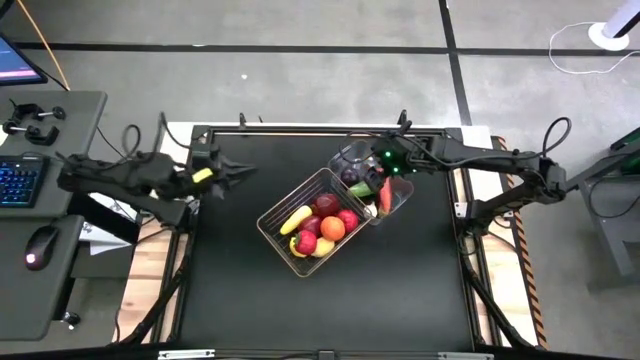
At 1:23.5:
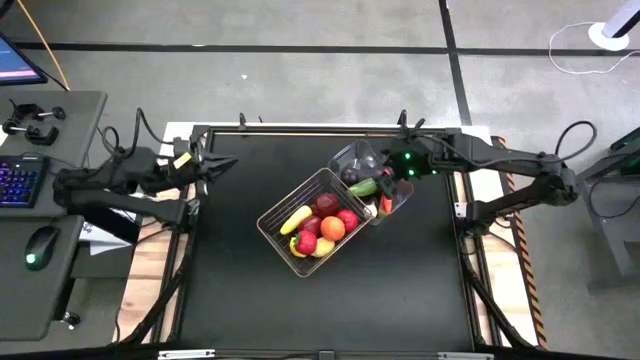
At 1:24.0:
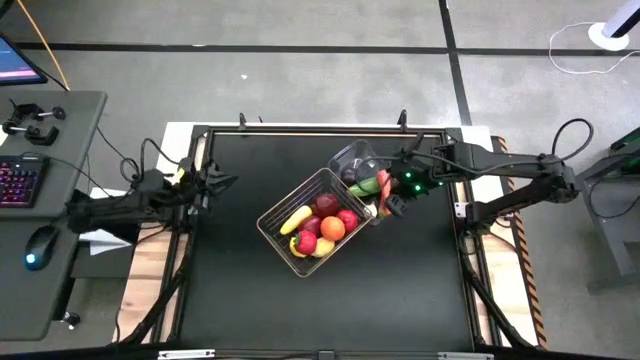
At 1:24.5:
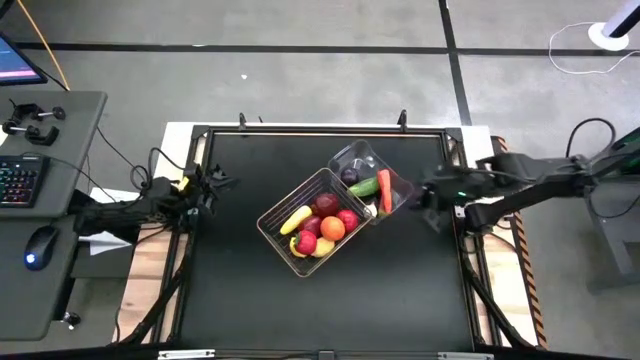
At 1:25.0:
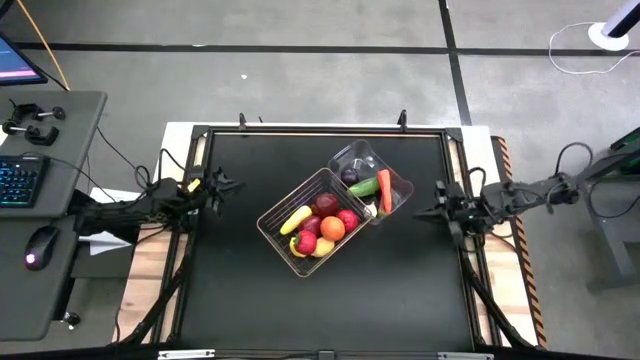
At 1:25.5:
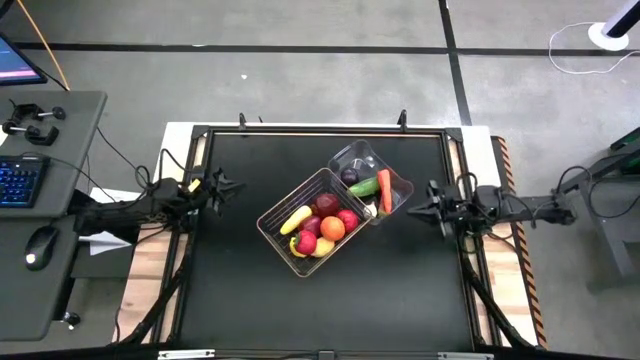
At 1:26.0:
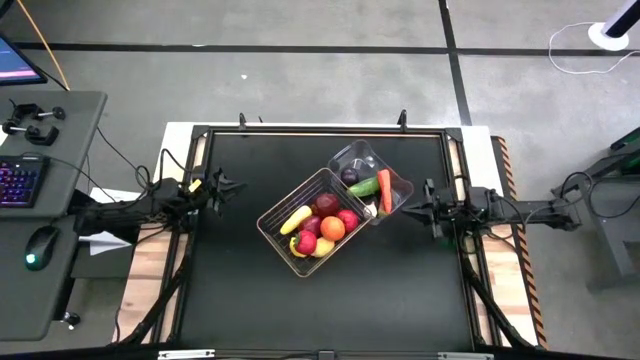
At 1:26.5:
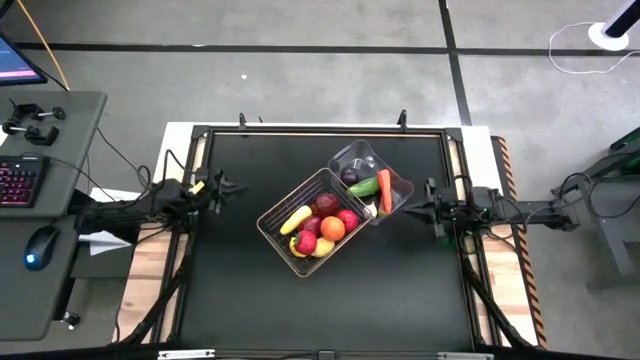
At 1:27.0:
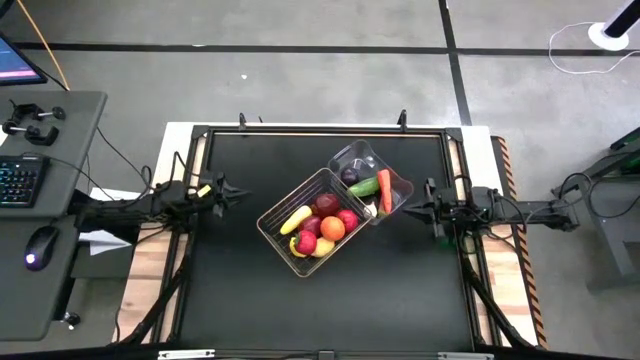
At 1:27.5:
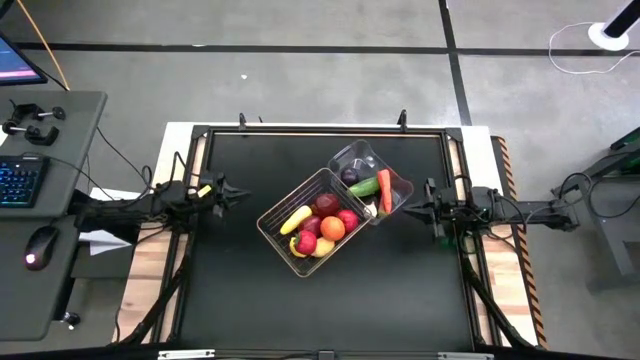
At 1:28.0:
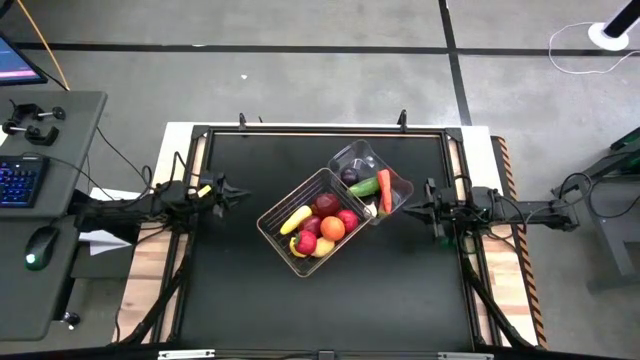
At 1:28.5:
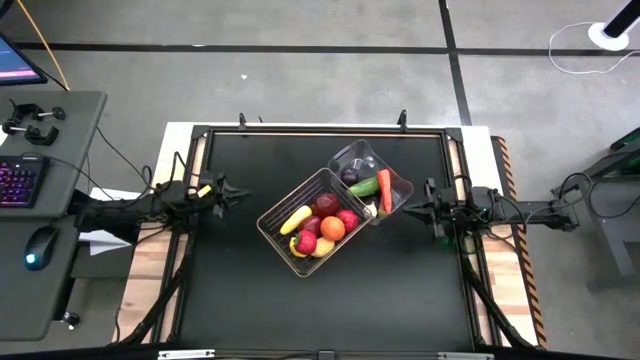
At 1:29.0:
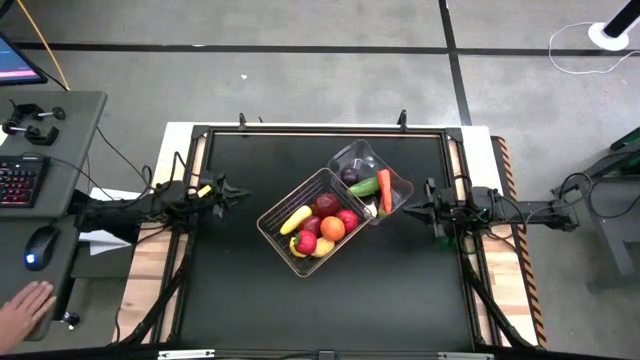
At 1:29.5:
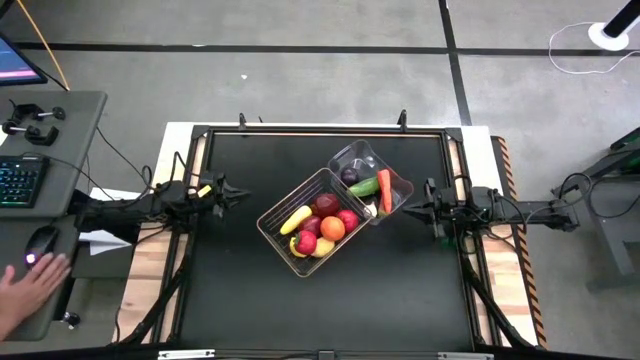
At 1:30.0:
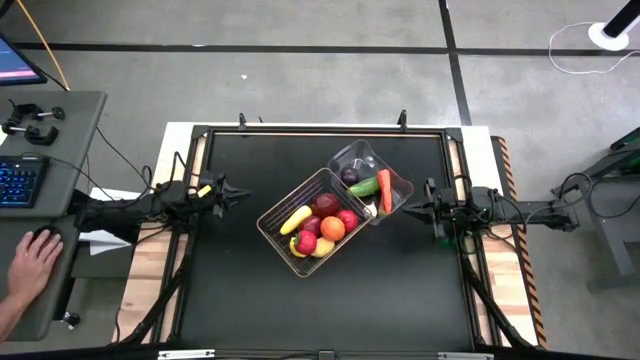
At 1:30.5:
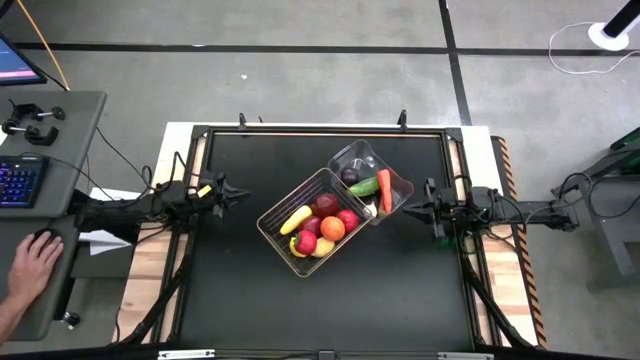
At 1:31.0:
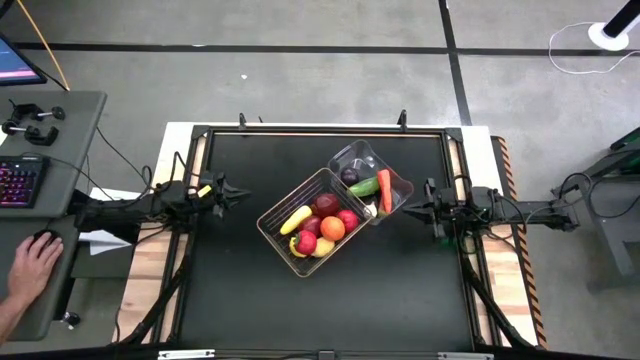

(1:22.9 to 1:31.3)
Task: Sort produce into baskets
Return to Home Position

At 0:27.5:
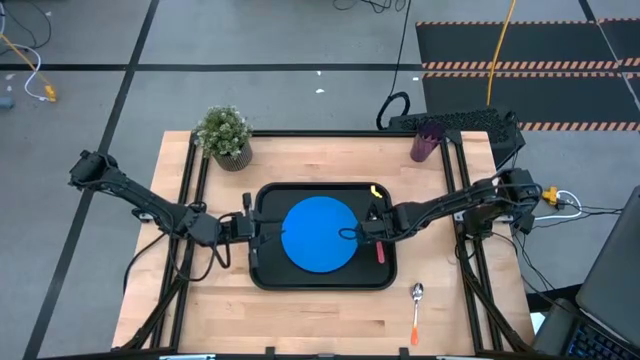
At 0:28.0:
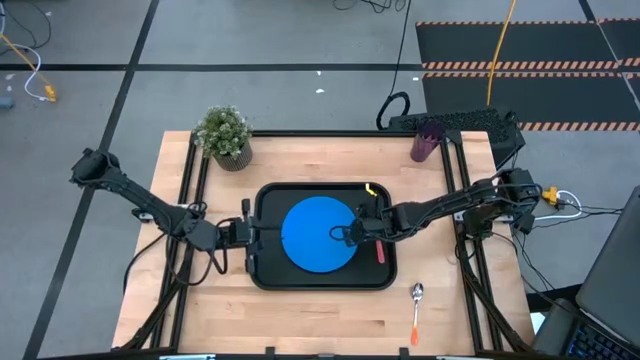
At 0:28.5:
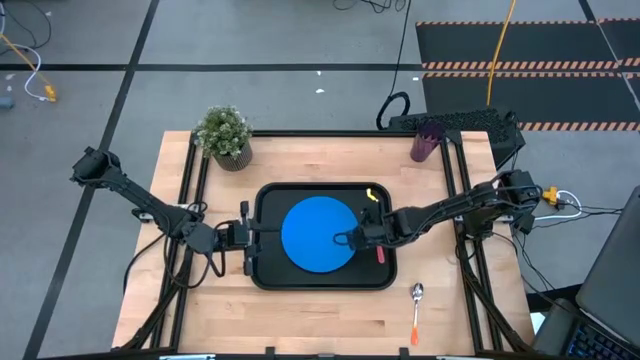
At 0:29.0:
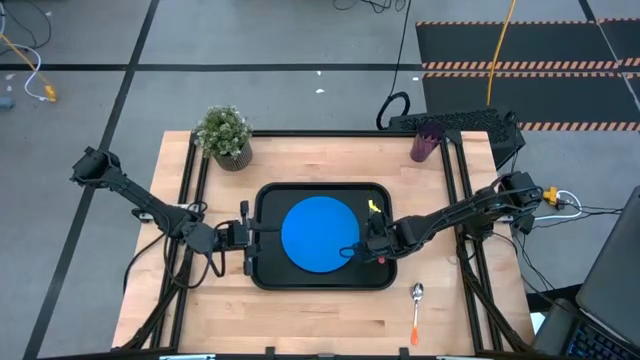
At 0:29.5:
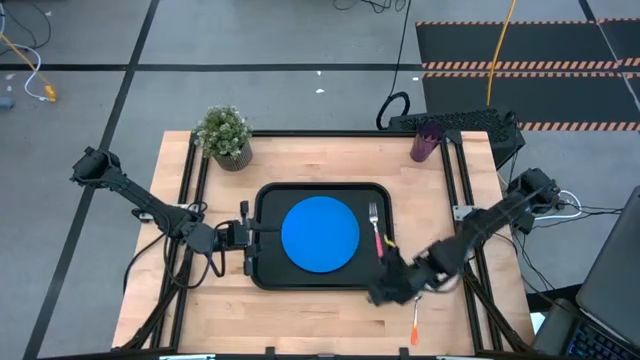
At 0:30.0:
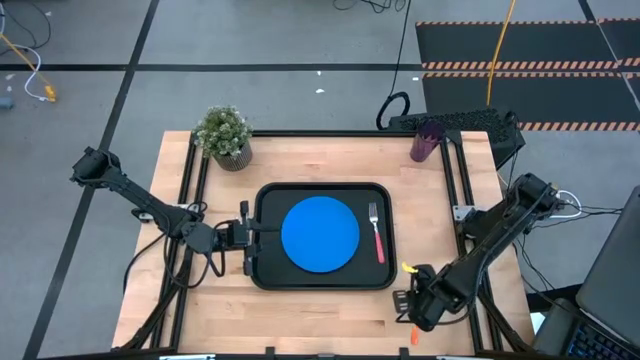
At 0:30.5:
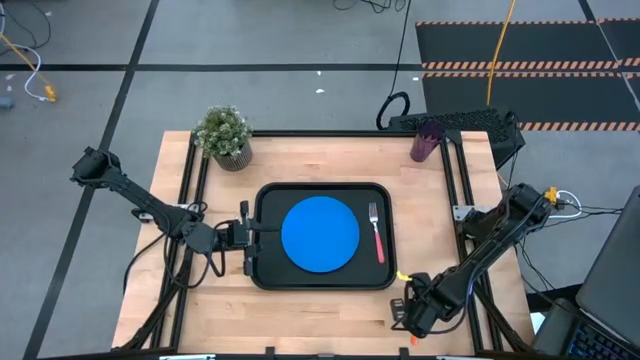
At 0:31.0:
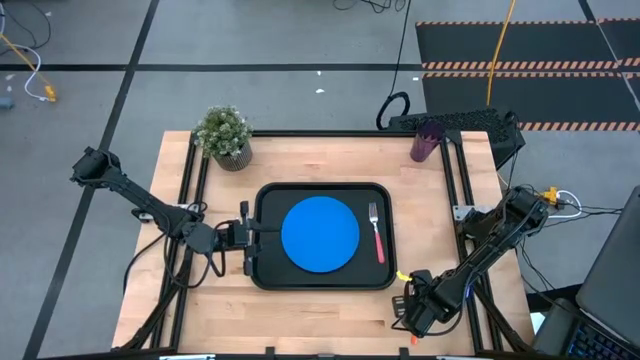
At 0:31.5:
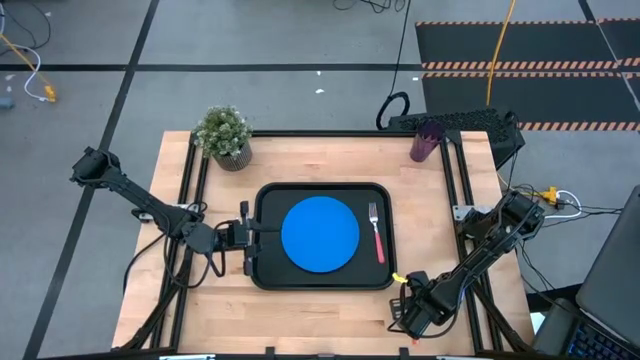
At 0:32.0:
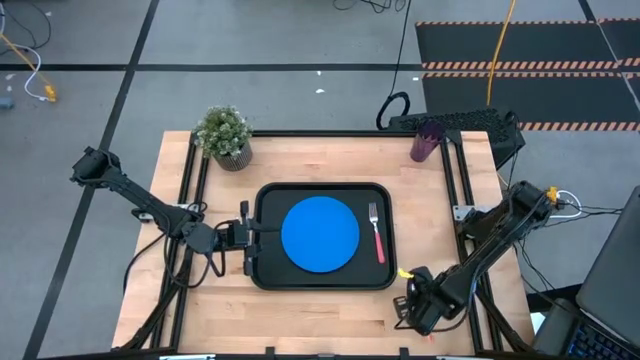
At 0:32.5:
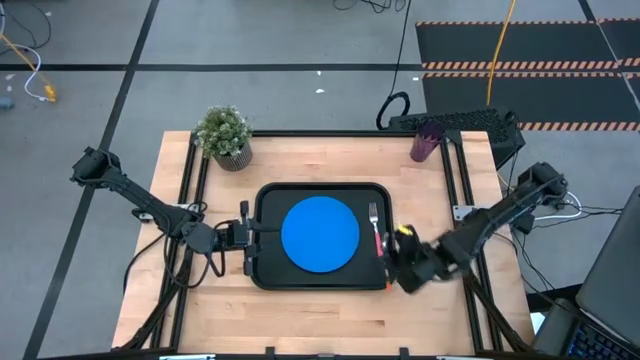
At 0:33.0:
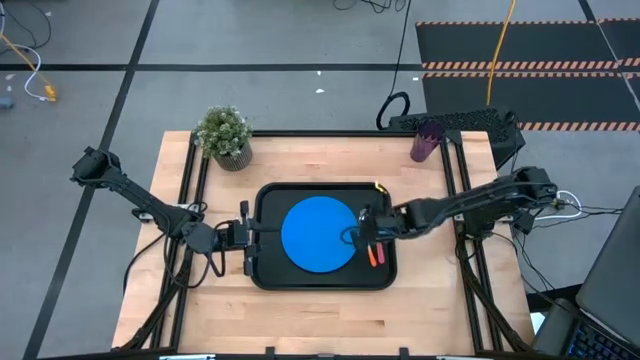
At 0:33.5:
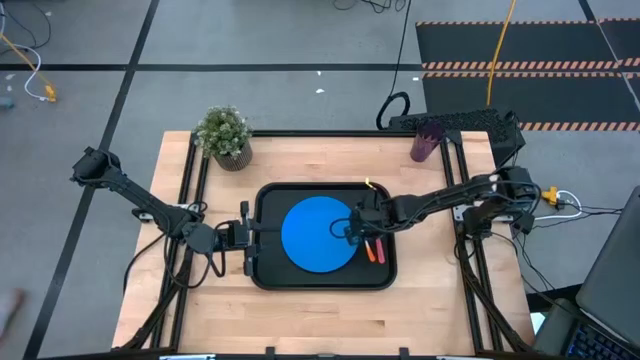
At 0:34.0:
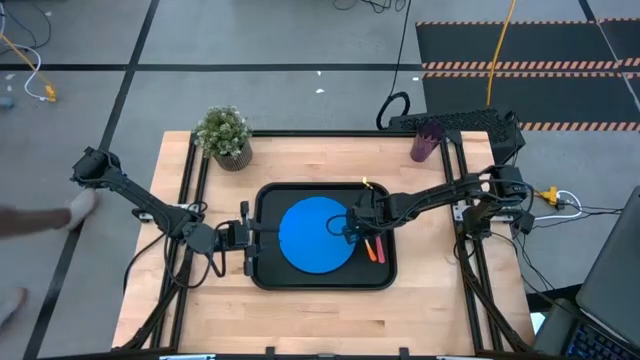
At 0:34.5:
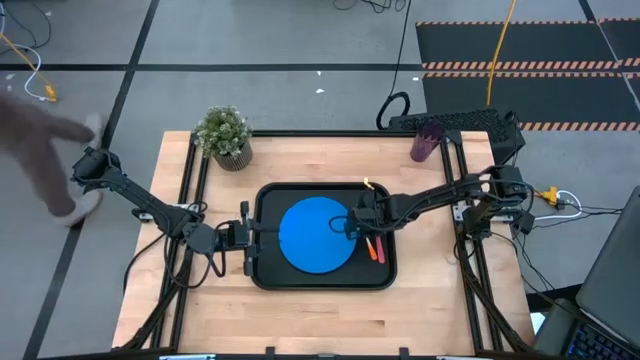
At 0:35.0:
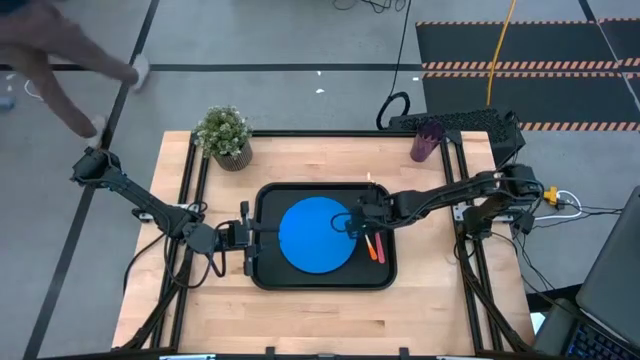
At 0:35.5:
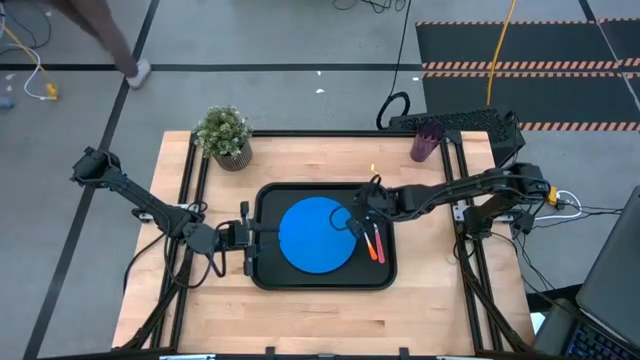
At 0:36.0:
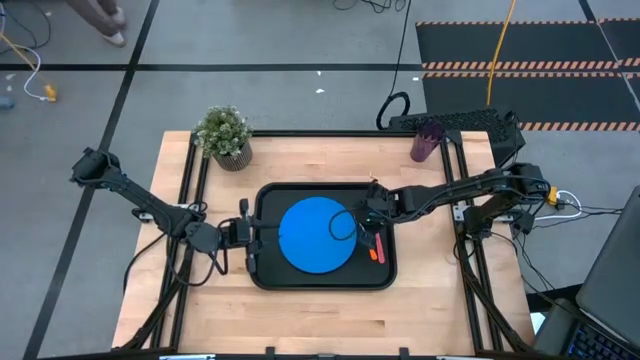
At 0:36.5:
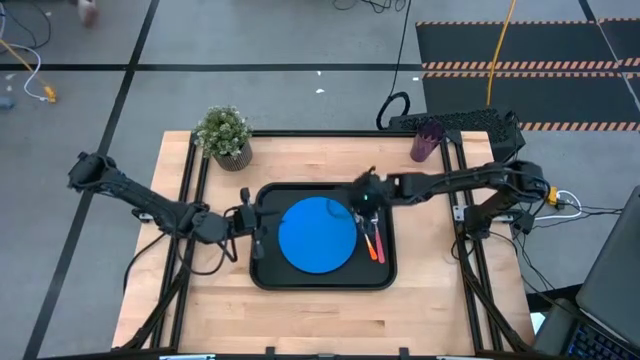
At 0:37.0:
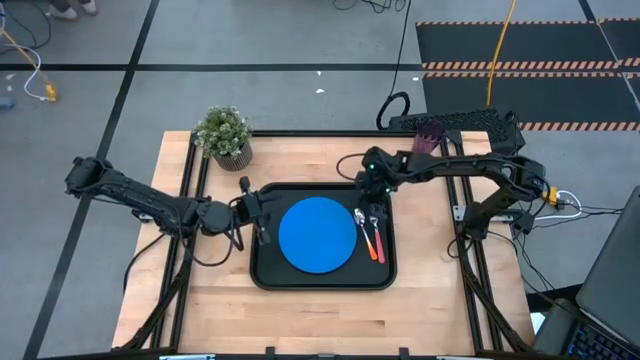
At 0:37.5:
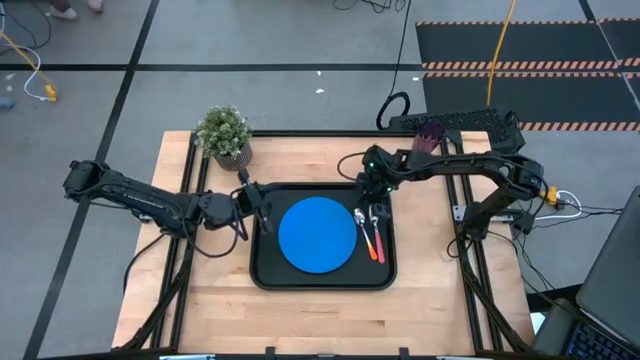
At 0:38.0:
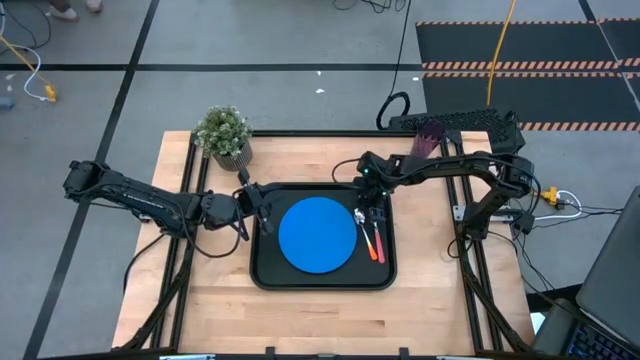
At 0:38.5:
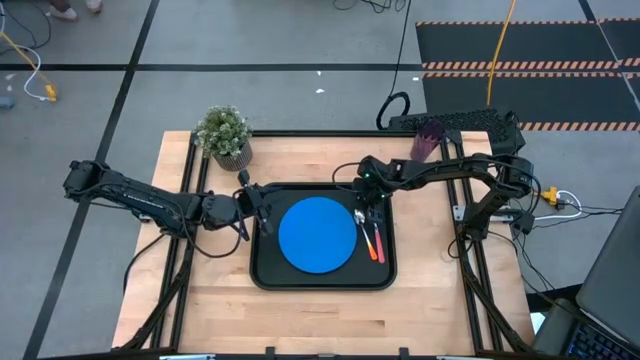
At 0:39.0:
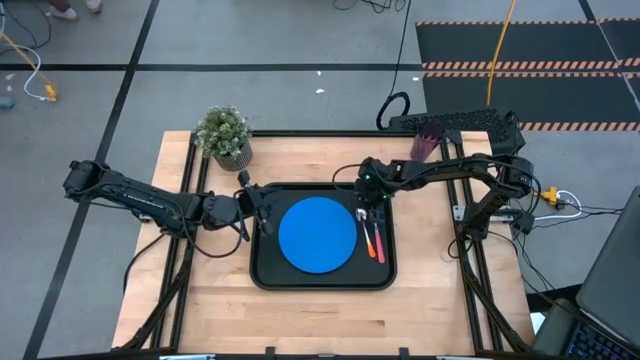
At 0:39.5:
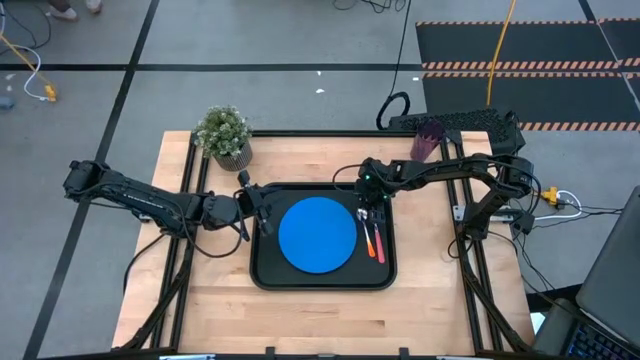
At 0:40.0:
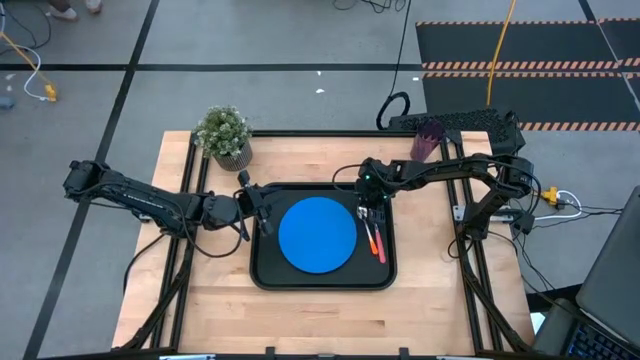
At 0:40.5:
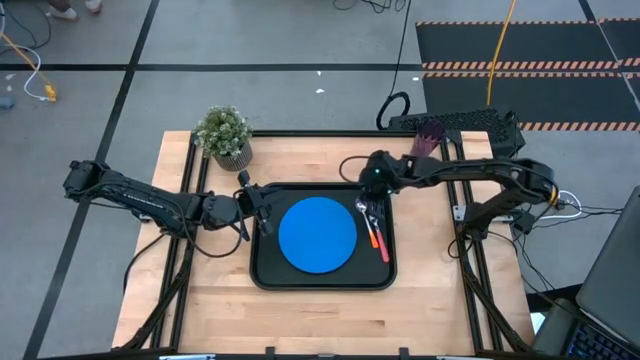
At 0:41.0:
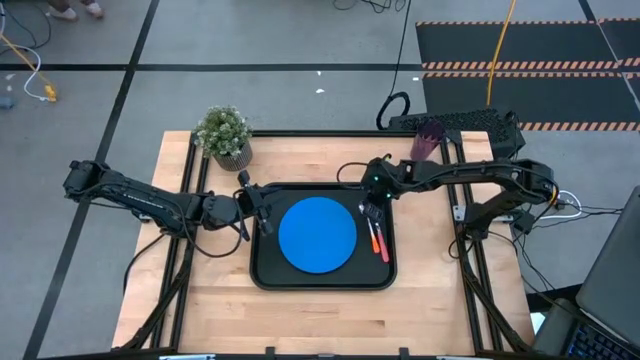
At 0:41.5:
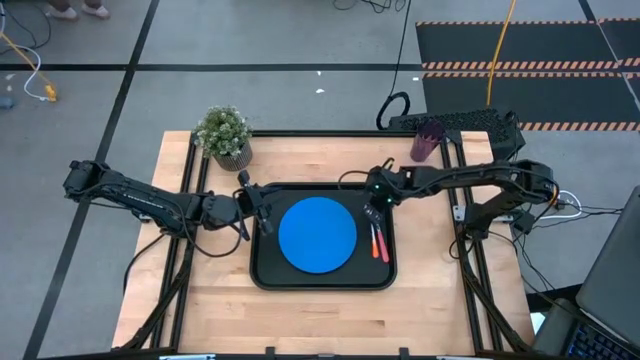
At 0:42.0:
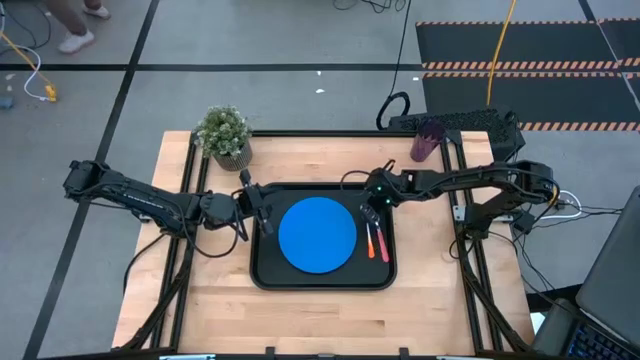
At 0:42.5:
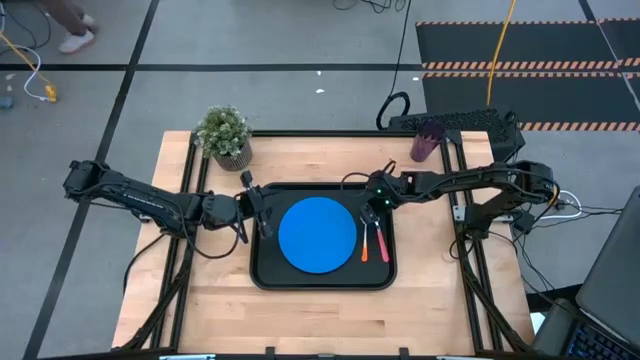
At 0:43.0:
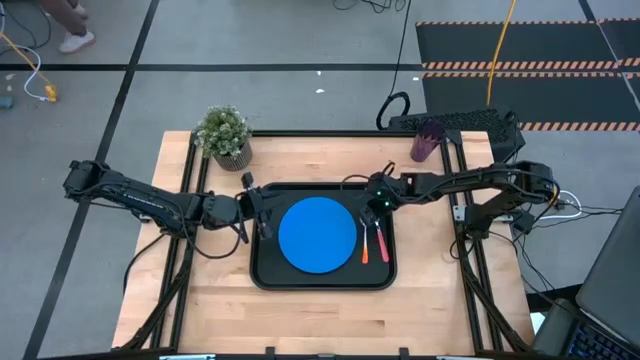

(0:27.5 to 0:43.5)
Task: Pick and place plate/cup/fork/spoon on tray
Put the orange spoon on the black tray between the blue plate and the pink fork
